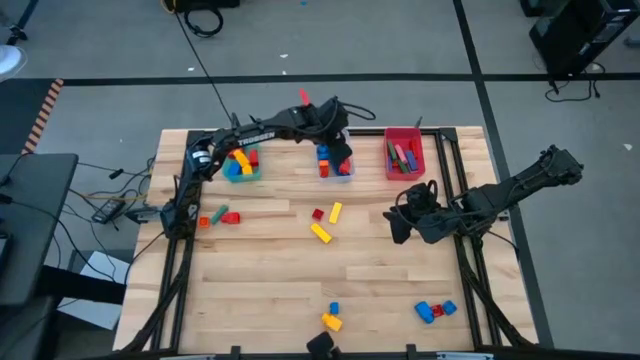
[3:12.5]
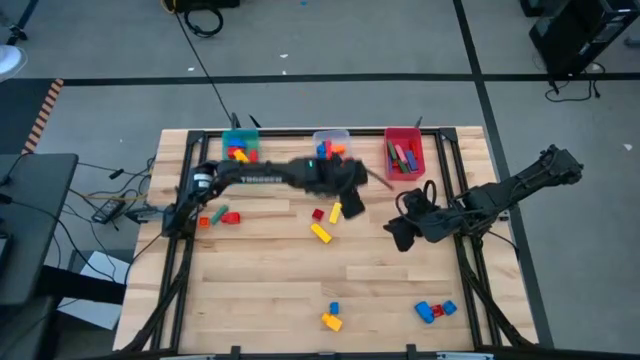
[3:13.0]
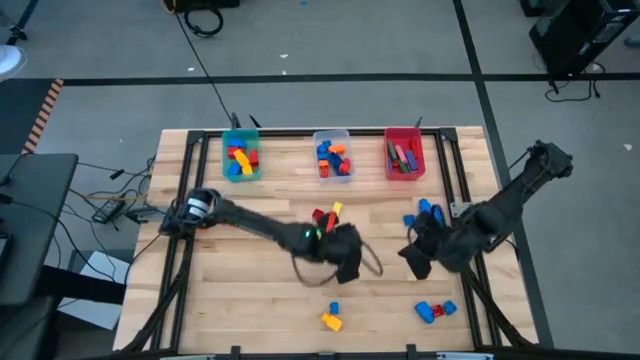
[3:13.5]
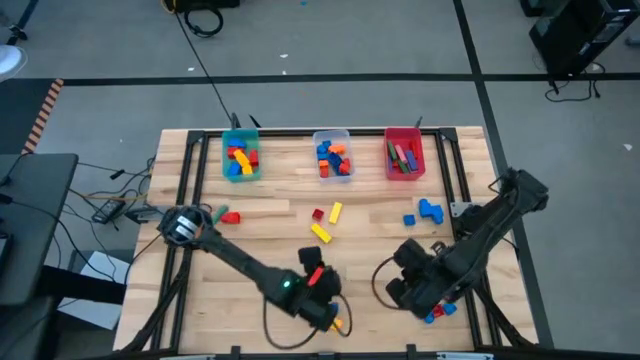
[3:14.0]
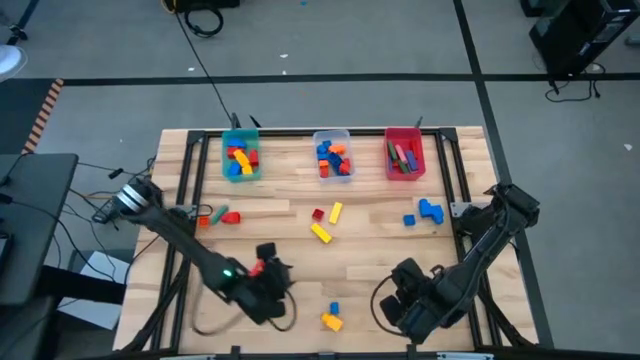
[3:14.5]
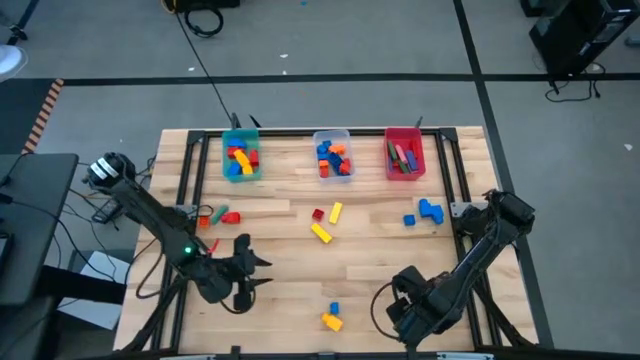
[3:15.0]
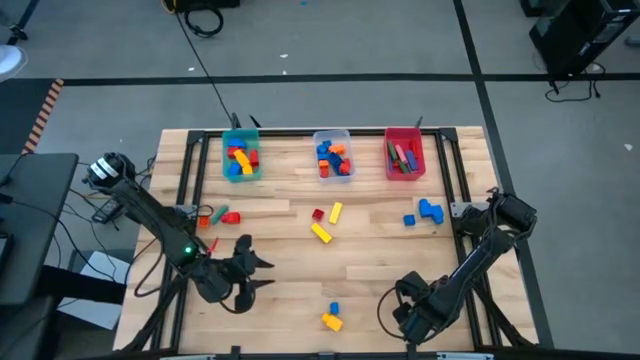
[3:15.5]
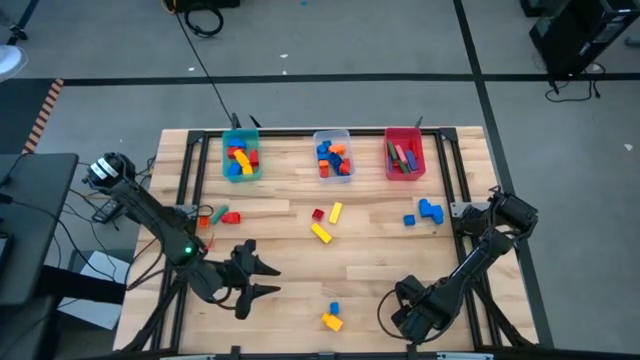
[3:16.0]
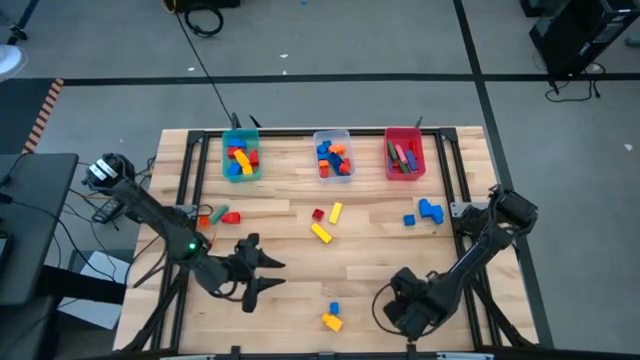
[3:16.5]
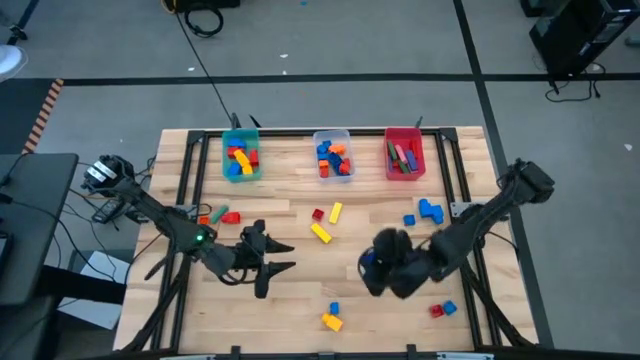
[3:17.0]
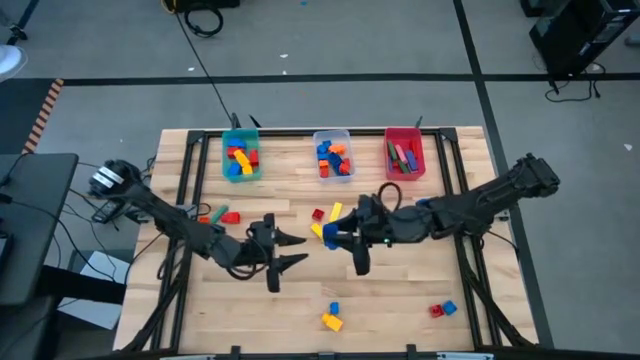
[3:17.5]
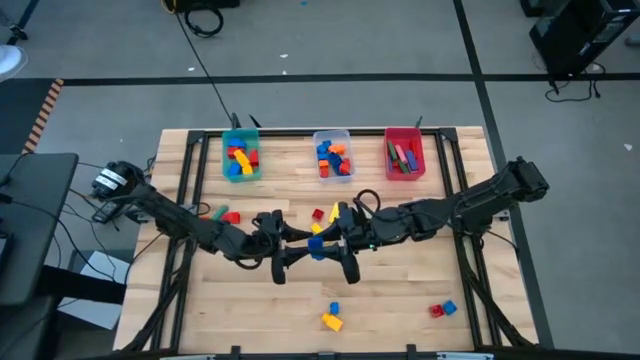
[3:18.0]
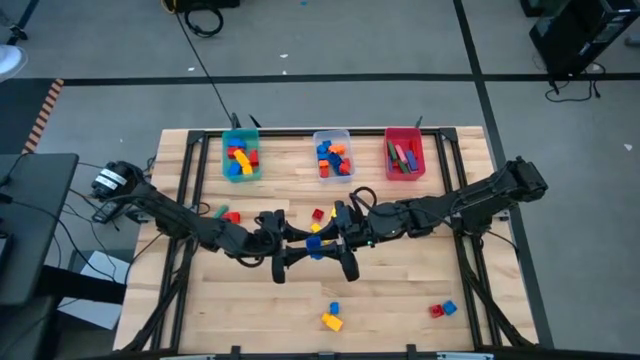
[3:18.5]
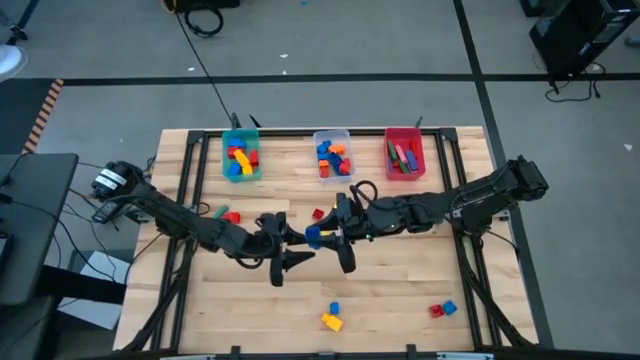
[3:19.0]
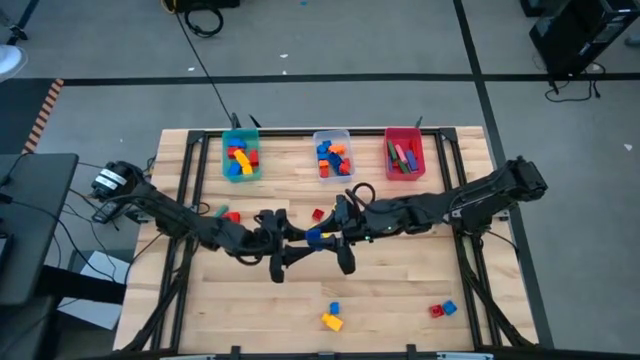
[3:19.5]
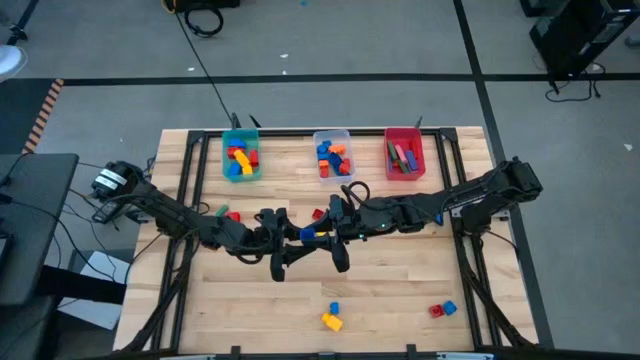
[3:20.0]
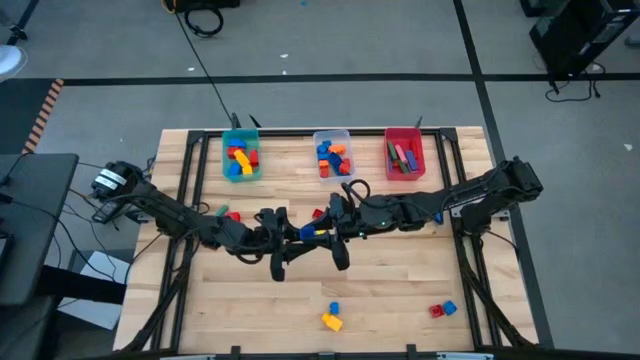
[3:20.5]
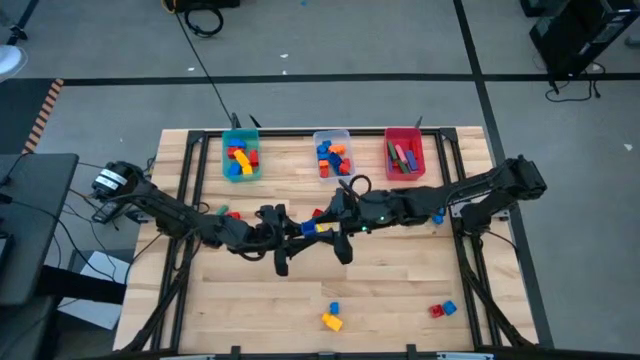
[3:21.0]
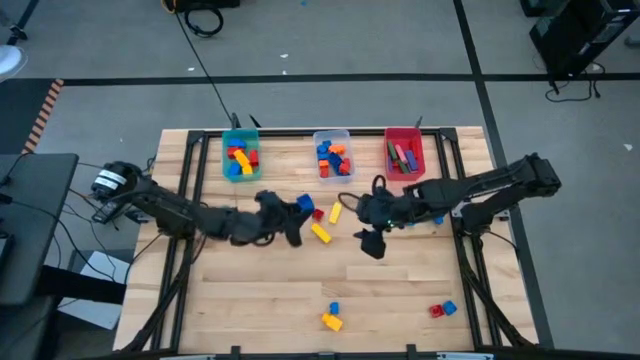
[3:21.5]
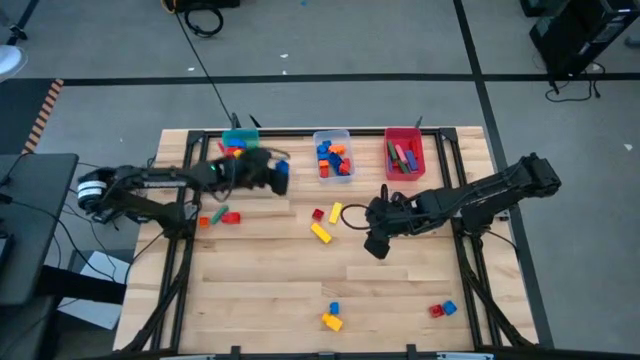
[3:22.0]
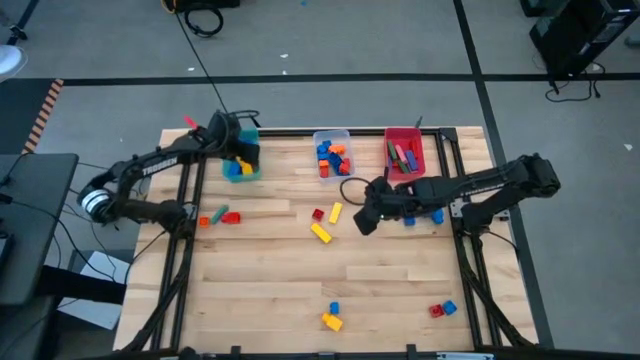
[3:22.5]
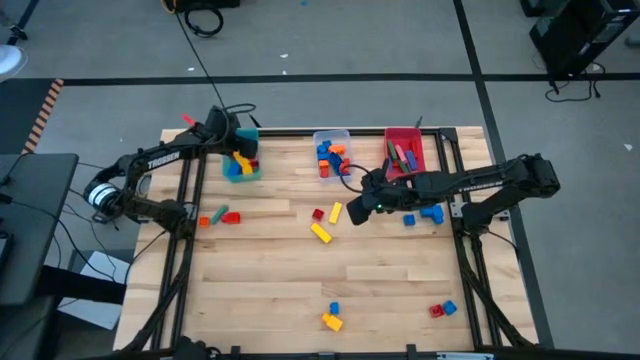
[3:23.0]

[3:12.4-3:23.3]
Task: Sort blocks by size
Put the blue 1 stud game piece into the blue bin

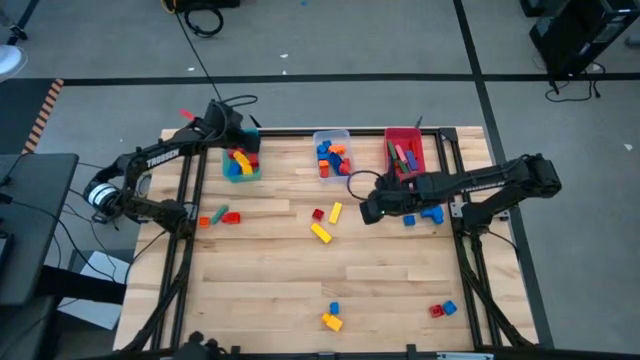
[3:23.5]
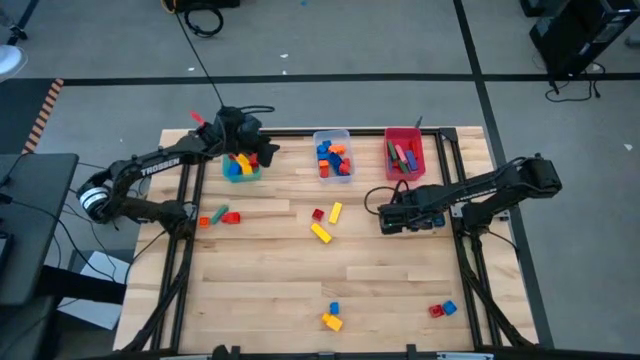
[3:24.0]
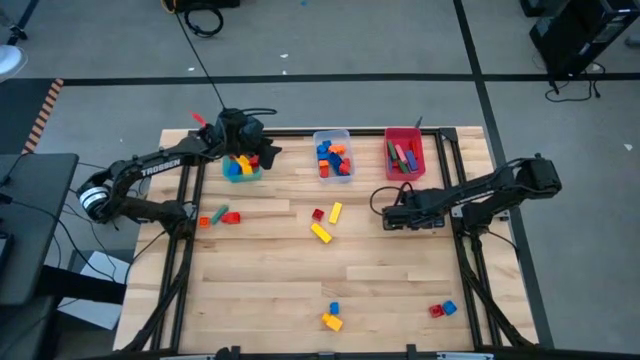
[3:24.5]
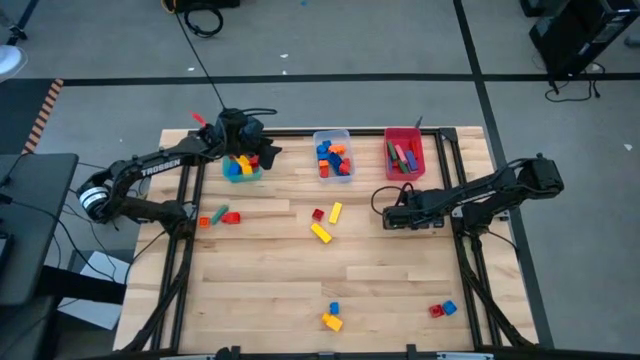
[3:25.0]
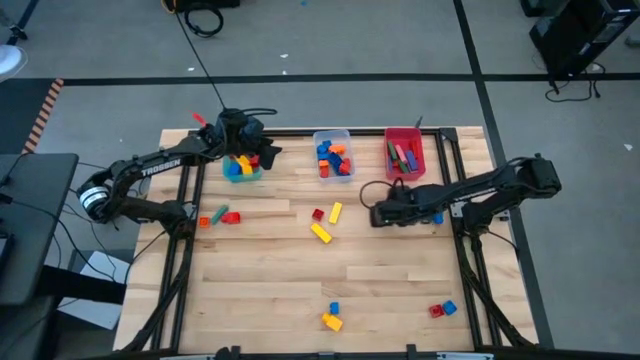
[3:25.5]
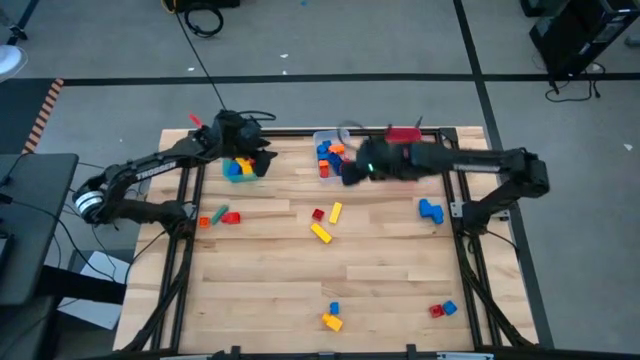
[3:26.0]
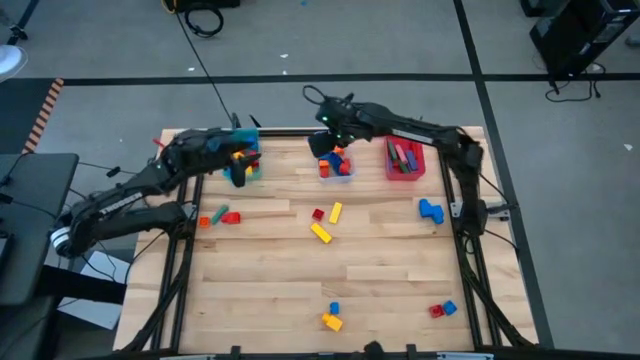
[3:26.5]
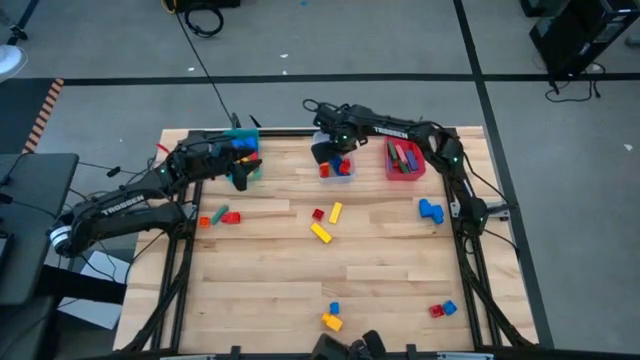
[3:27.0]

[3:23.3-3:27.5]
Put the blue 4 stud game piece into the transparent bin

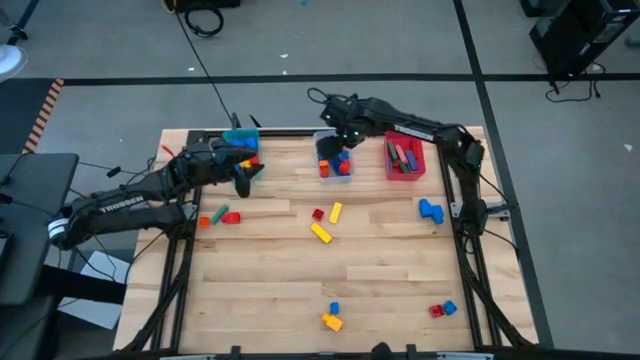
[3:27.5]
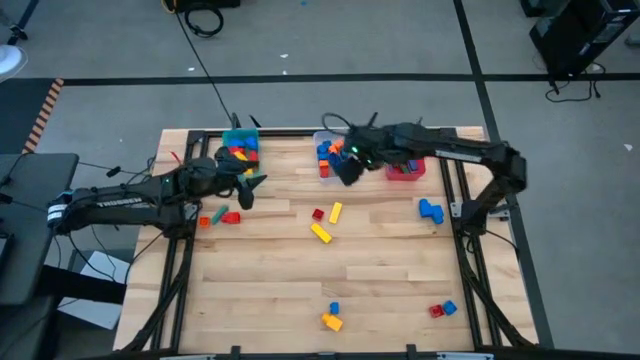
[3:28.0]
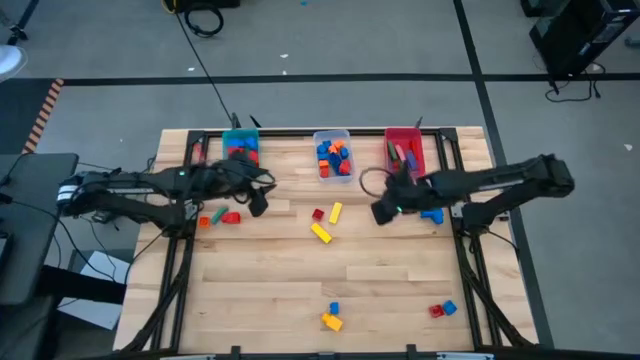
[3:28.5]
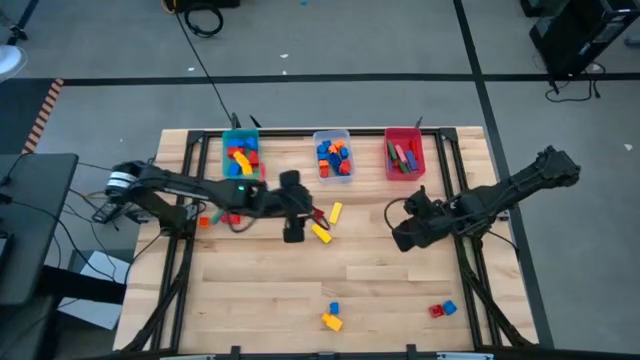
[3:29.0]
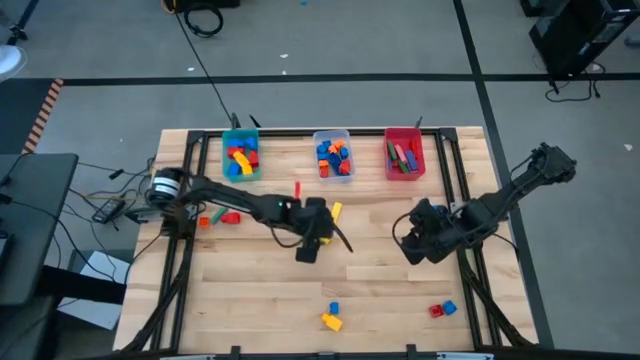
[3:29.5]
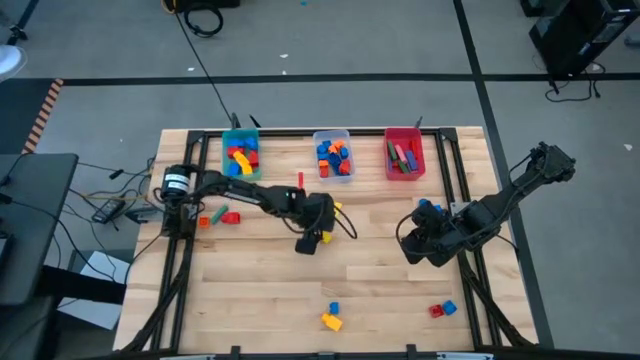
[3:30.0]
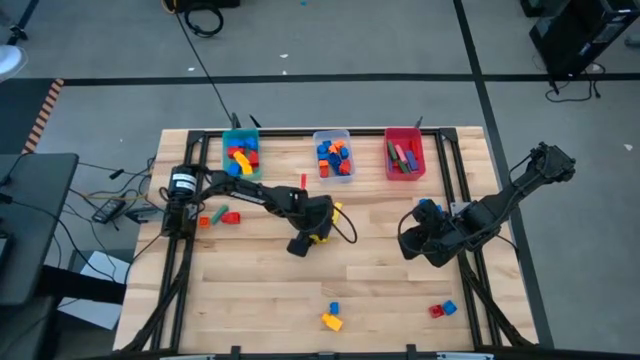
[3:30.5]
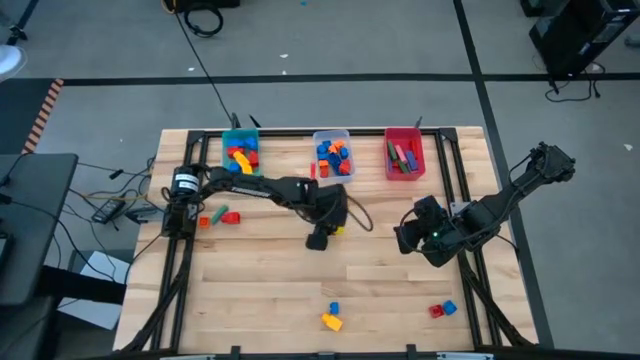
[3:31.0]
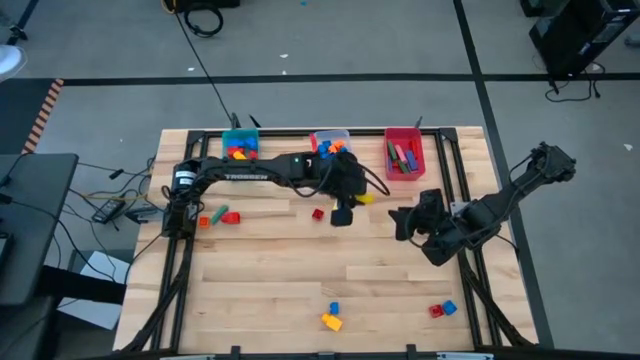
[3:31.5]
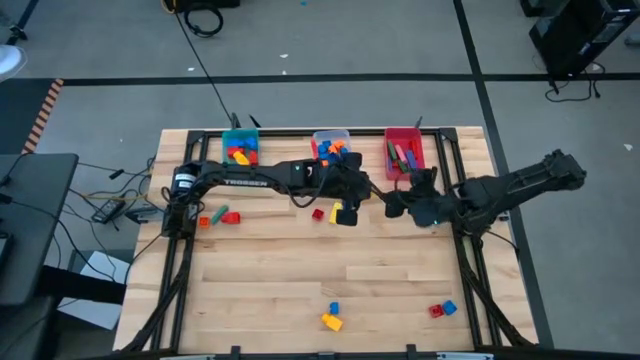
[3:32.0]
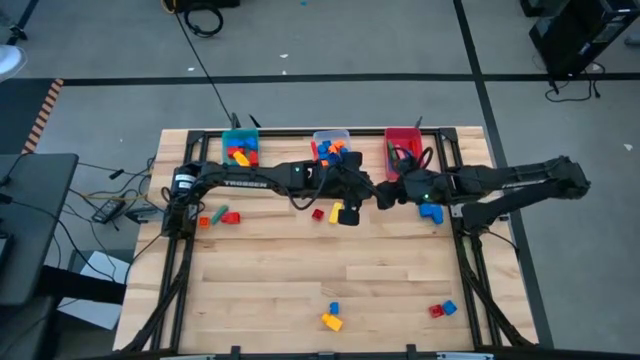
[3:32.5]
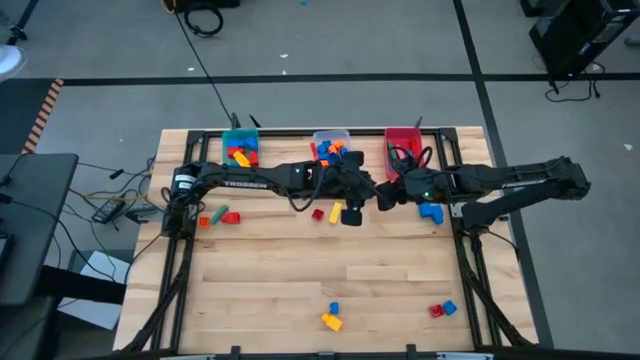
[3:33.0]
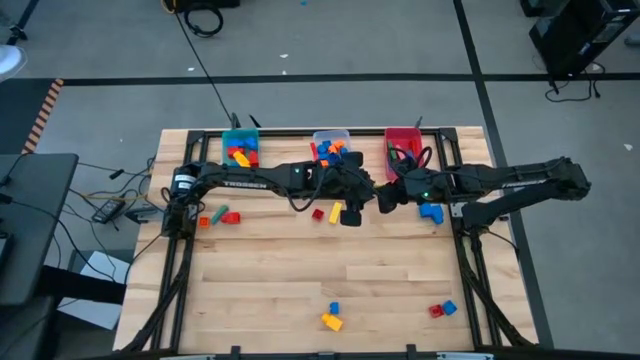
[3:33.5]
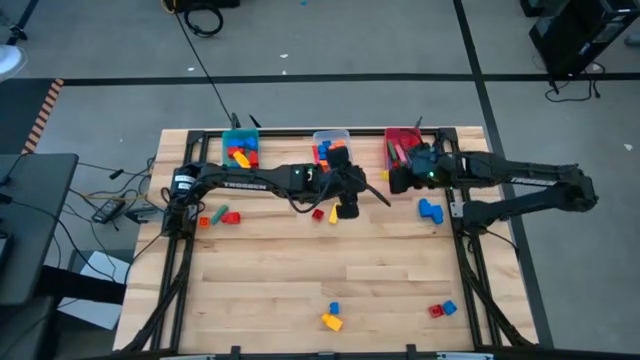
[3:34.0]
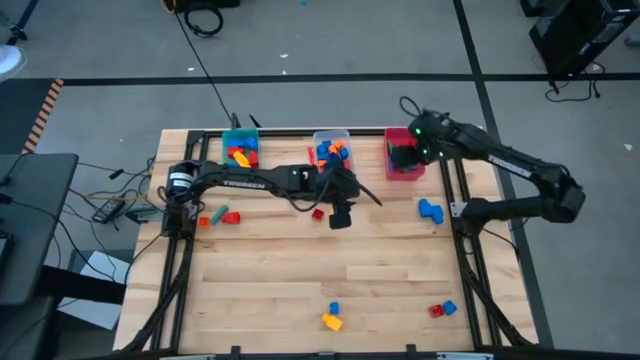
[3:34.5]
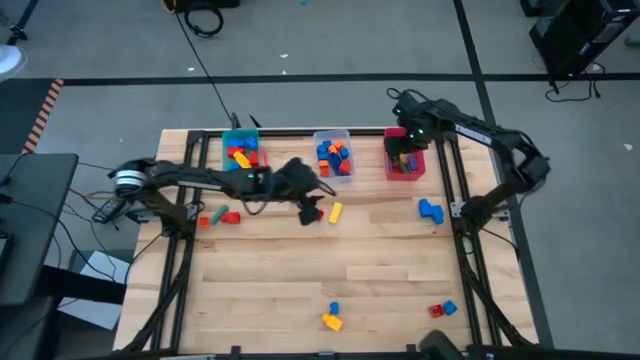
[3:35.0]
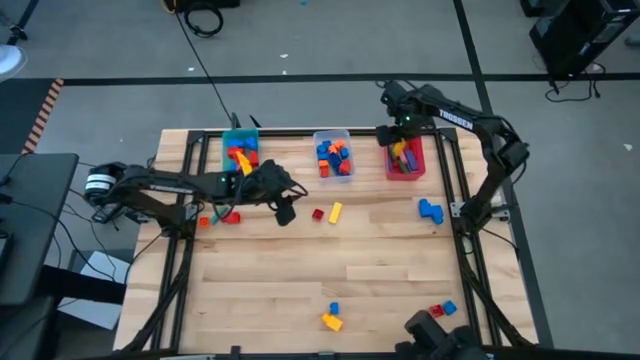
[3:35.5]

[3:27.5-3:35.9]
Put the yellow block into the red bin
